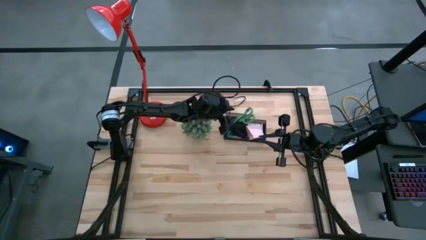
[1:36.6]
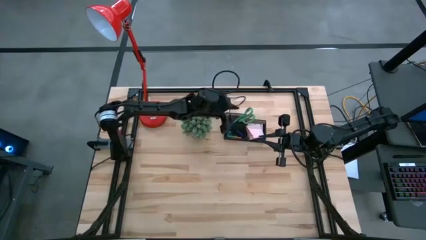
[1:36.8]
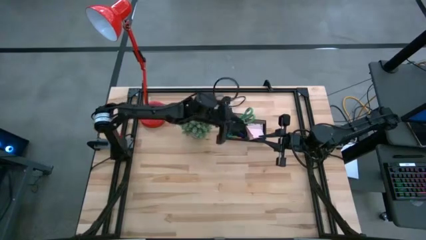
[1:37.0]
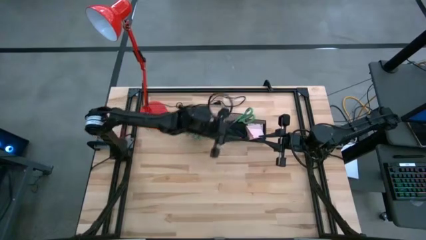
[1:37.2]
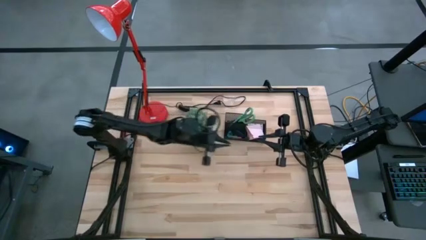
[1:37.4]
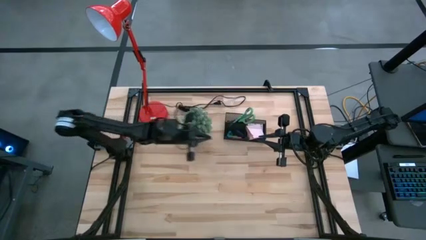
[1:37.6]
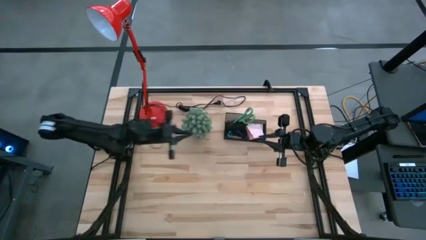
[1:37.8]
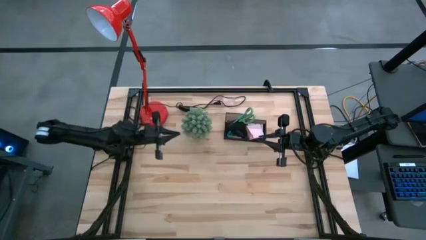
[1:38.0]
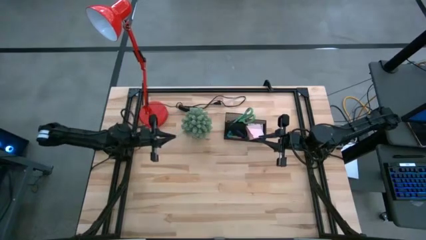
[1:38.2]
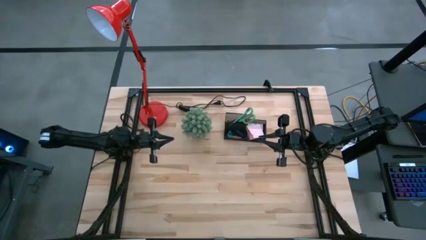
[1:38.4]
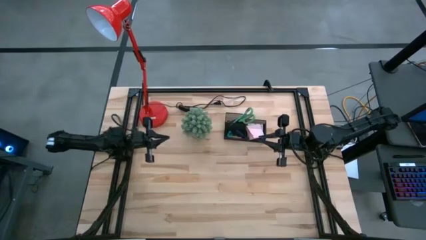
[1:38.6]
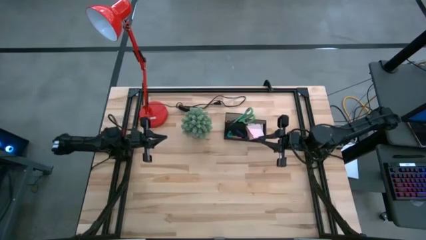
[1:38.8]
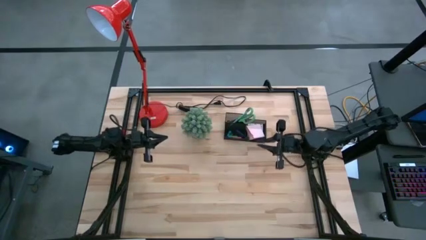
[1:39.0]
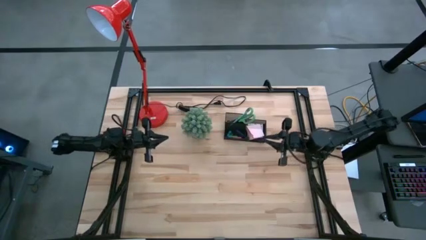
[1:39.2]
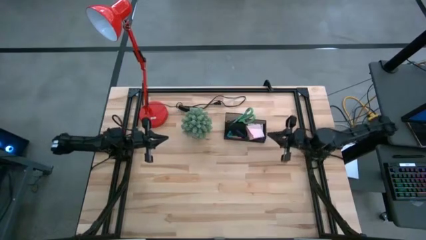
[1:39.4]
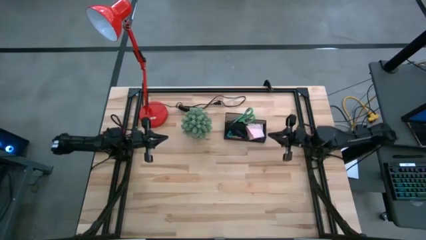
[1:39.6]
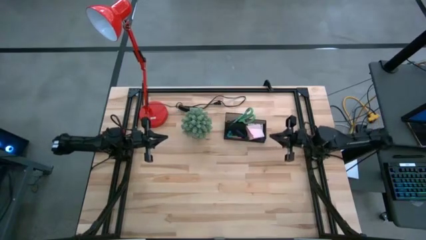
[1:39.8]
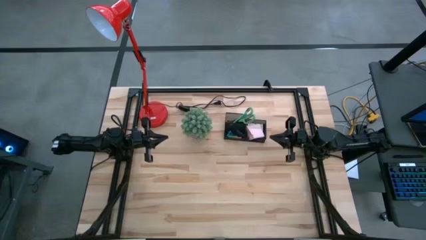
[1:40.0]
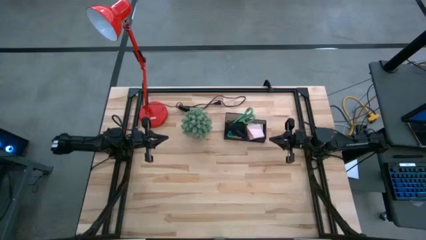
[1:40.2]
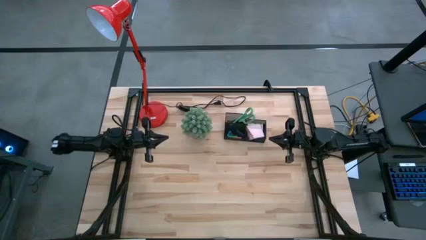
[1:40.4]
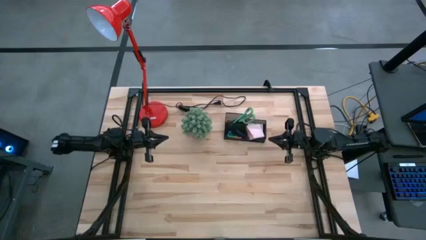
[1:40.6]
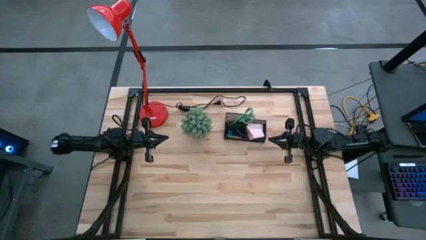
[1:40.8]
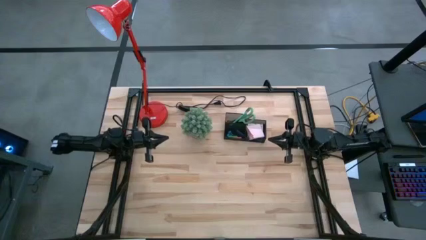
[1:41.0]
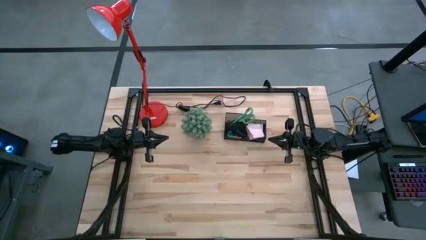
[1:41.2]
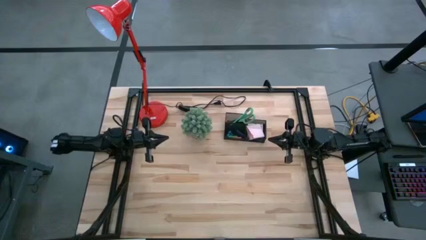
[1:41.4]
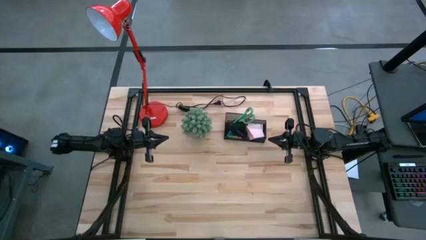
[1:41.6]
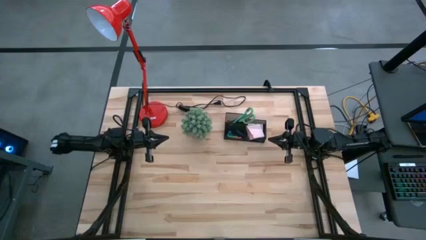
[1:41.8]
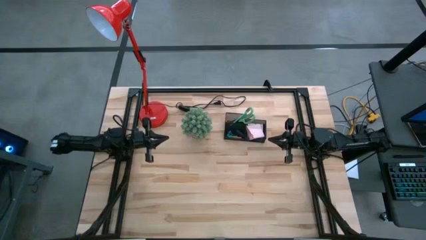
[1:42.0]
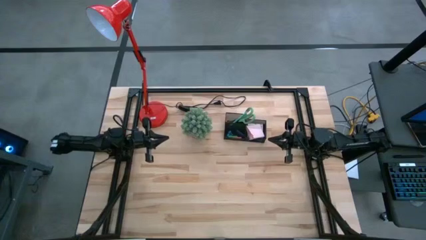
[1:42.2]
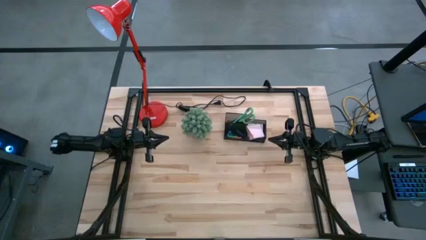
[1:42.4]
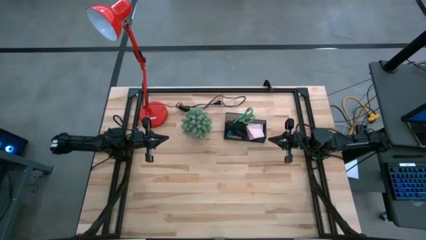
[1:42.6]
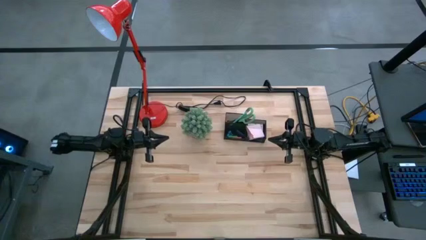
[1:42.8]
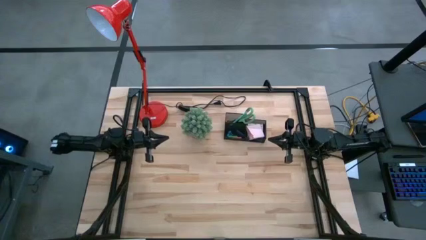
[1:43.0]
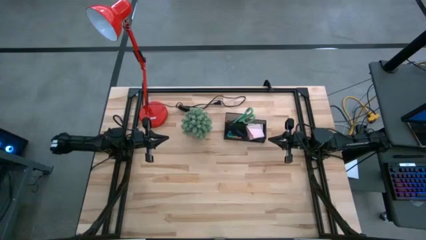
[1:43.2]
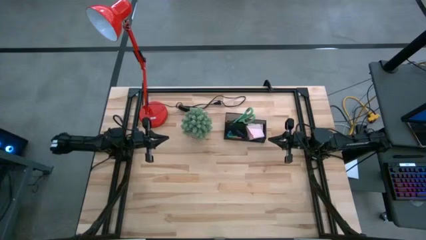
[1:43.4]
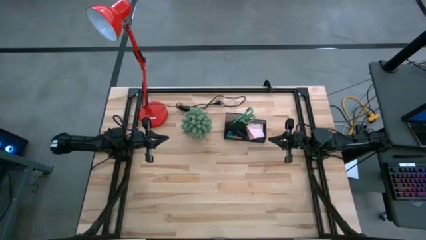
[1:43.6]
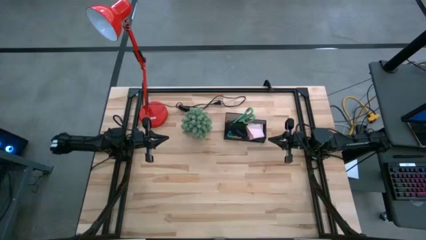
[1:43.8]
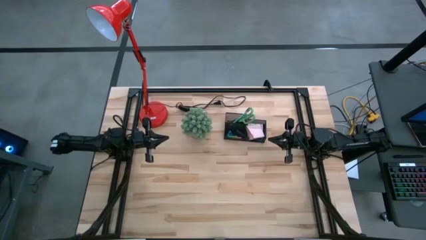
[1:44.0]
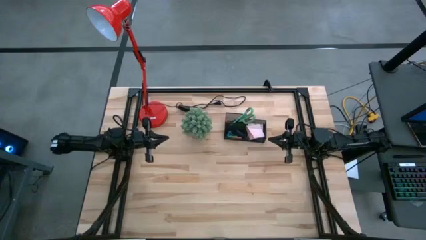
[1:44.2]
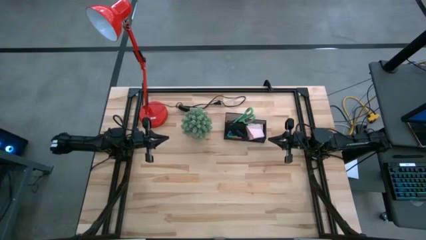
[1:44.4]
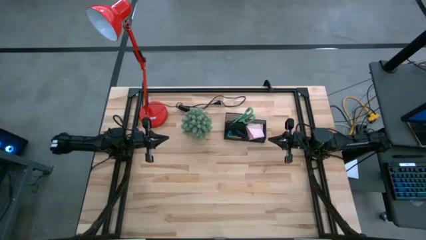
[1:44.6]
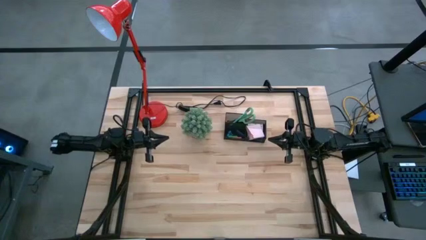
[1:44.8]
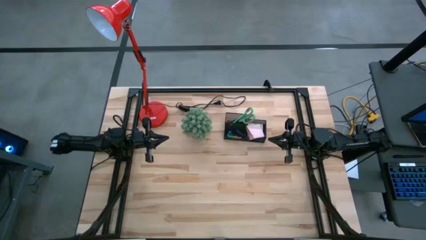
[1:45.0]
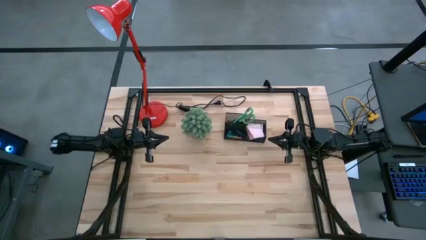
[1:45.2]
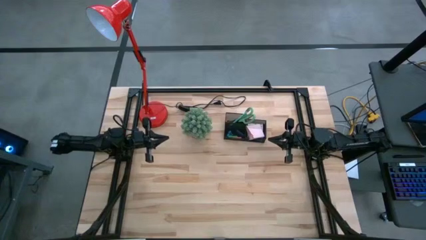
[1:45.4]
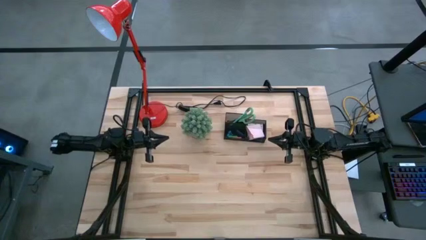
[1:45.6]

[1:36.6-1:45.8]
Task: Pick and place office supplies into organizer
Return to Home Position

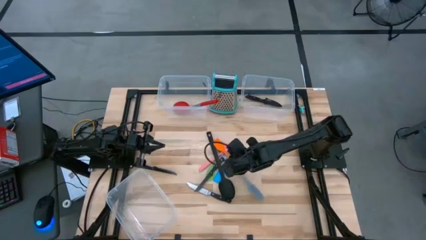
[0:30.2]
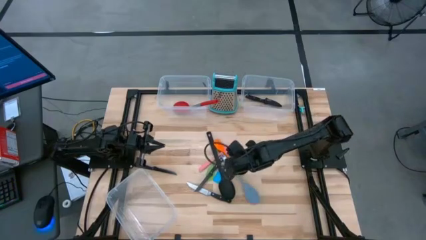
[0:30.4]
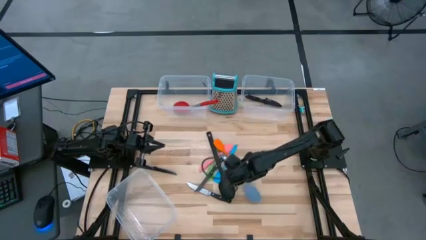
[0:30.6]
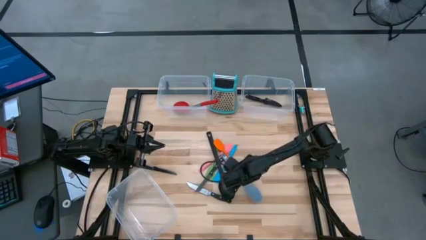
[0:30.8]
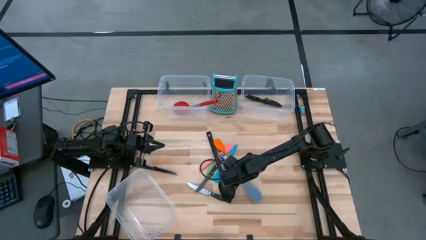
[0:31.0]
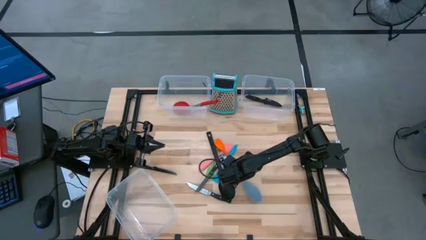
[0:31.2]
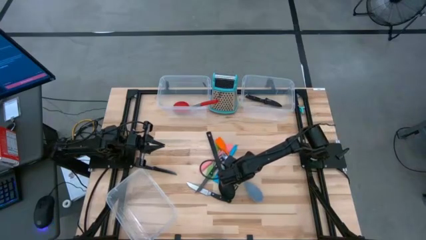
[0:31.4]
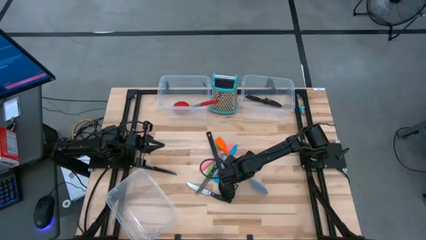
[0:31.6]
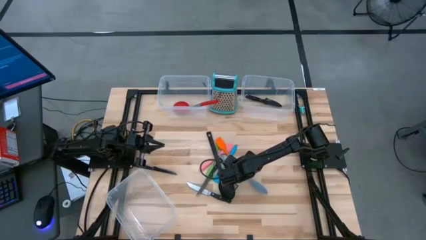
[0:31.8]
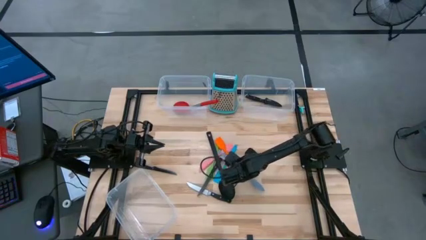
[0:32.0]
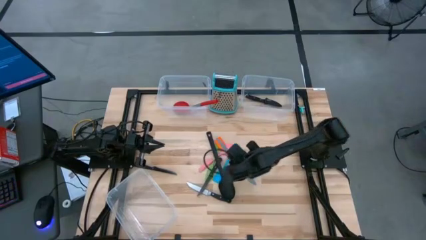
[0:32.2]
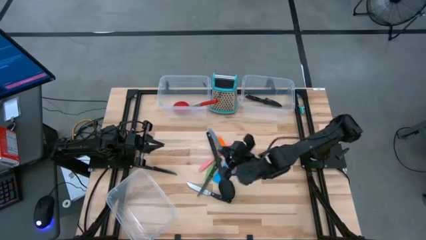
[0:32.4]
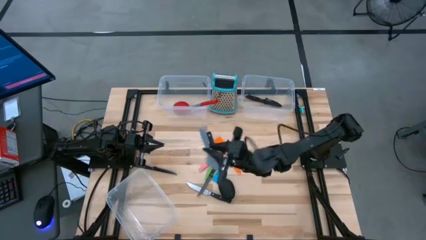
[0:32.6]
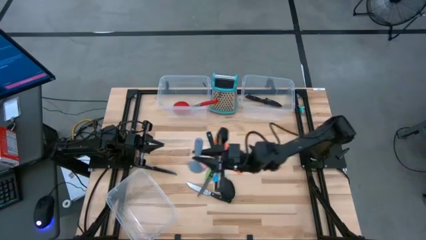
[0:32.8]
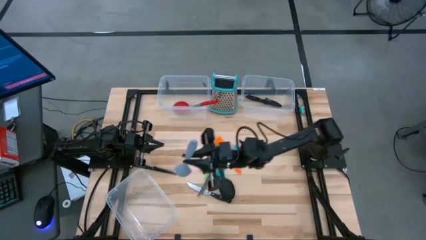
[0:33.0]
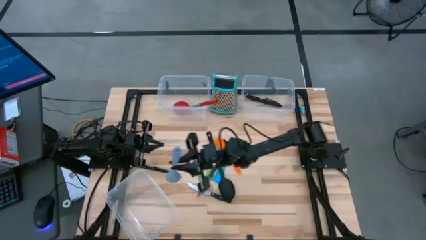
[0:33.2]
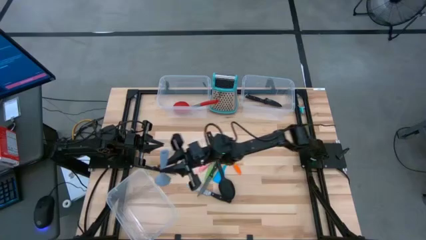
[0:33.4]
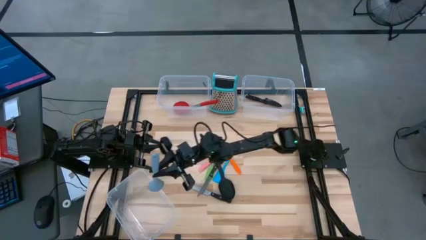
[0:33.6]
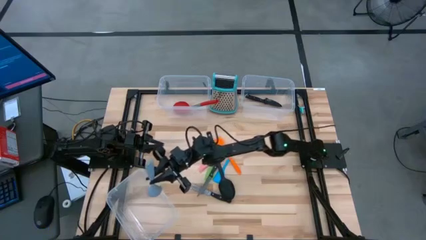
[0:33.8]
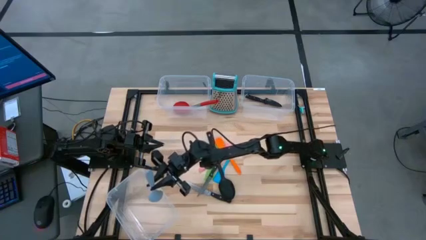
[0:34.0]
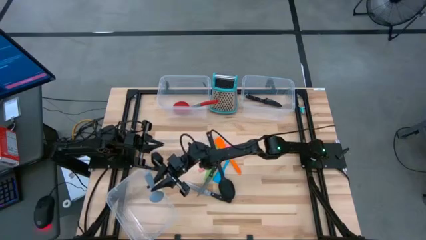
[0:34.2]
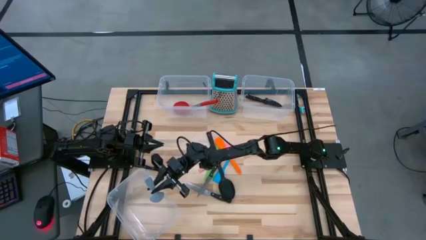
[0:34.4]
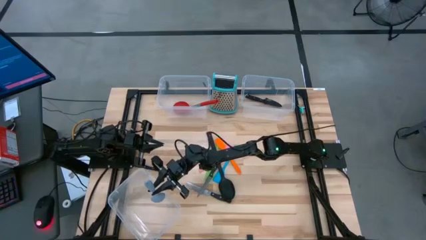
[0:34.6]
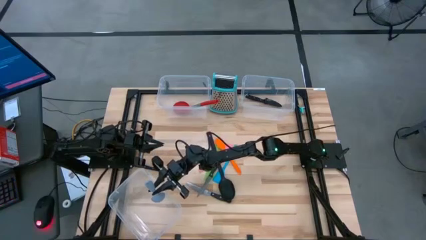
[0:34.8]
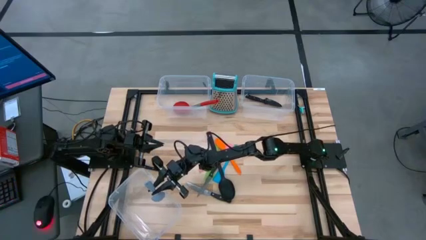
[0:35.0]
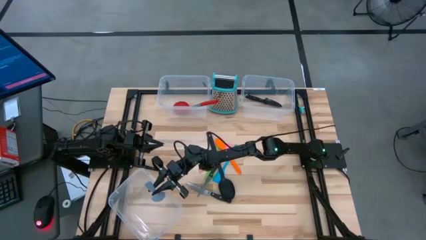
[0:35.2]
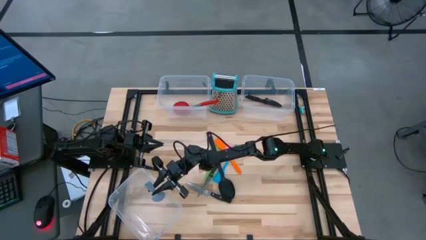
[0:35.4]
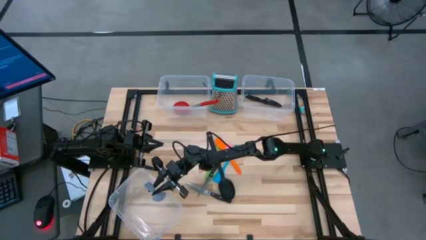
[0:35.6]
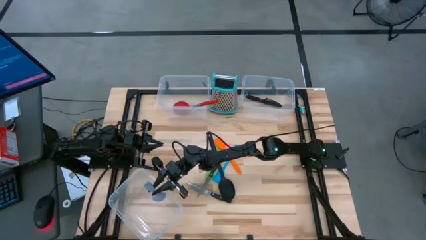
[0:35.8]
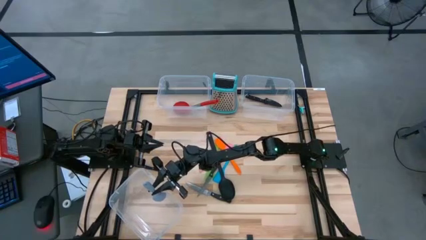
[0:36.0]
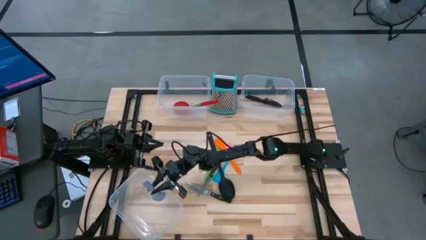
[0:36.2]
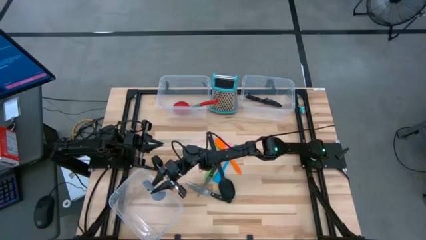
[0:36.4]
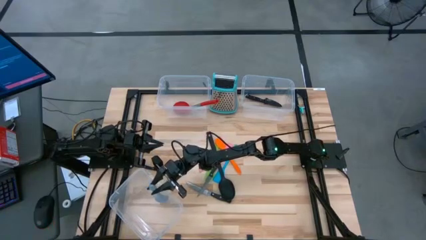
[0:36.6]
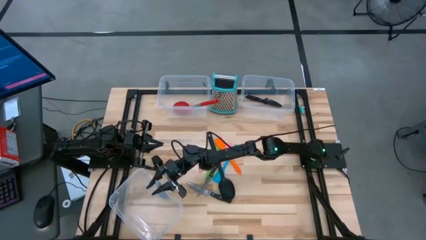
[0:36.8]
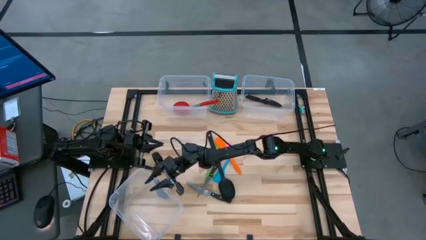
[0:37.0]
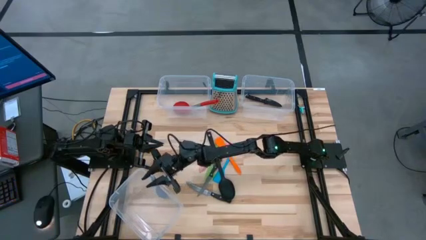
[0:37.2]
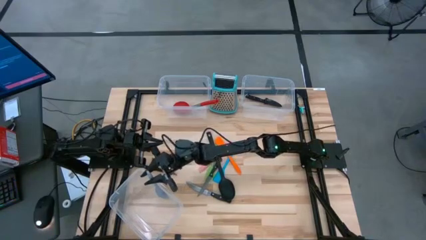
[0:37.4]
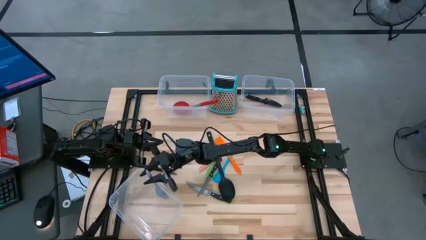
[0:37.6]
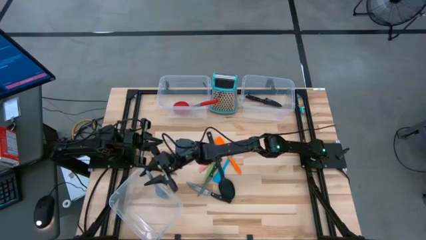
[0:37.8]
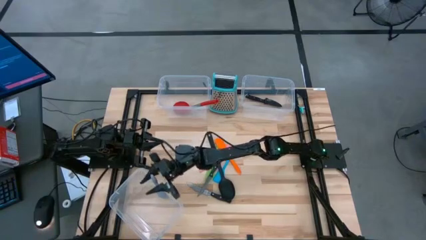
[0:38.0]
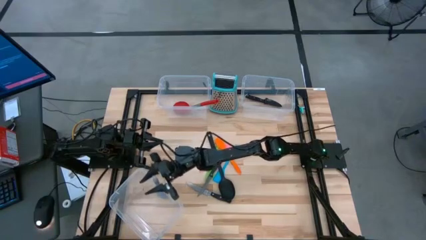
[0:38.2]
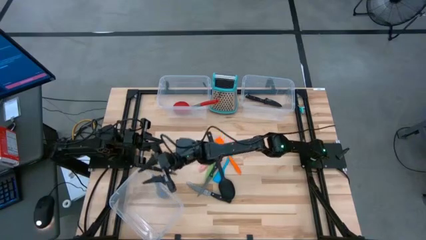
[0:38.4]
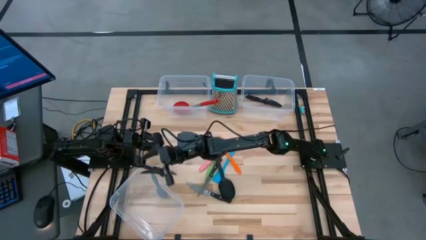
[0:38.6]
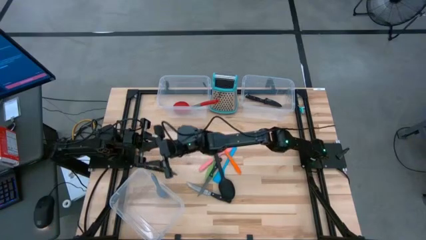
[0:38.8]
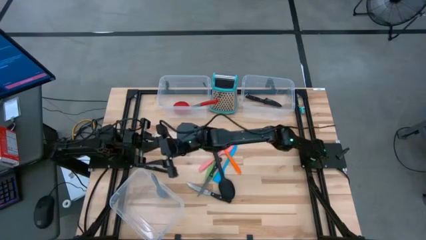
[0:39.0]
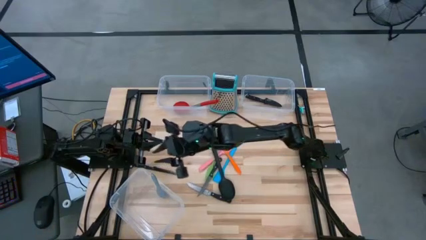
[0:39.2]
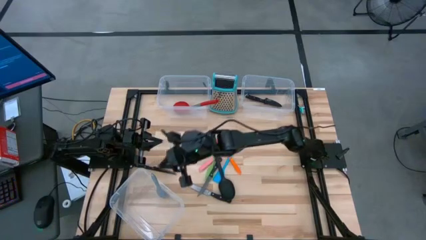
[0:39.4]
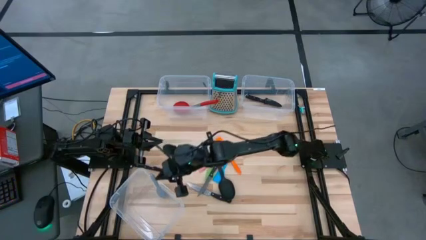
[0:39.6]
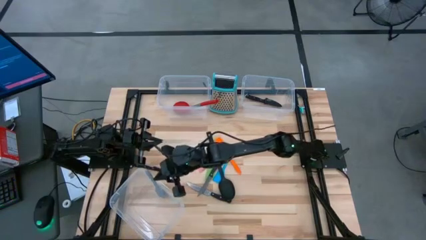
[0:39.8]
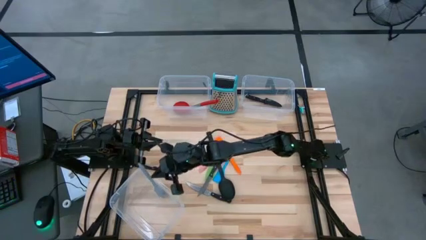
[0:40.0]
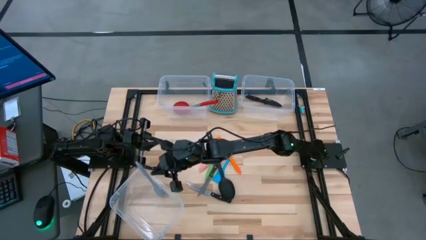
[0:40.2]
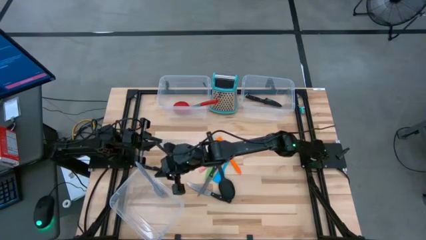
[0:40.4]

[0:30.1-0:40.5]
Task: Pick & Place Kitchen Items
Put the grey serving spoon into the bottom transparent bin
